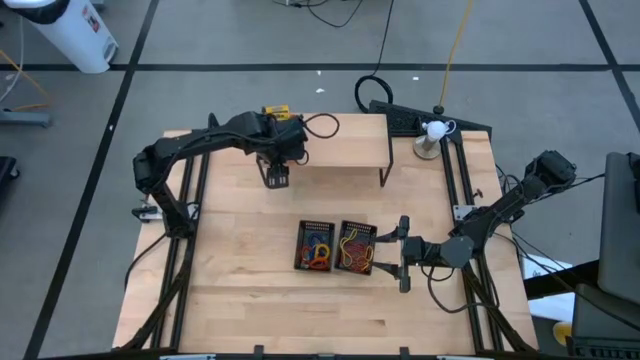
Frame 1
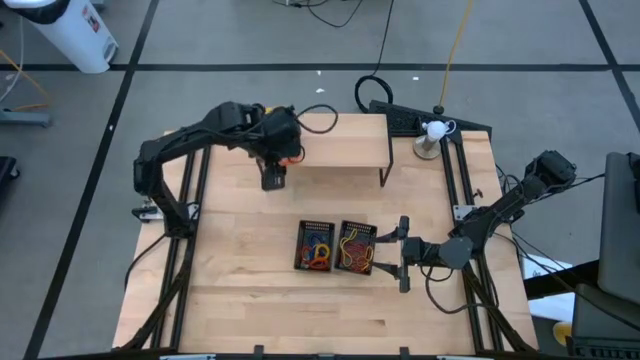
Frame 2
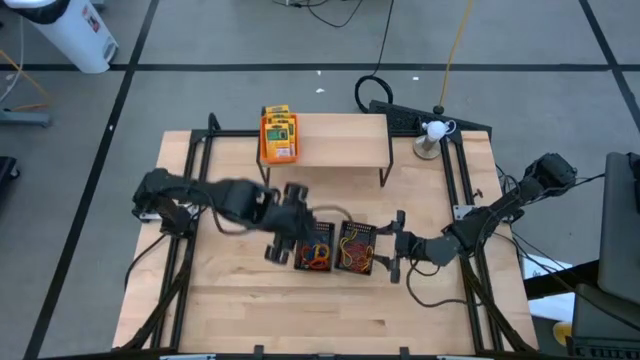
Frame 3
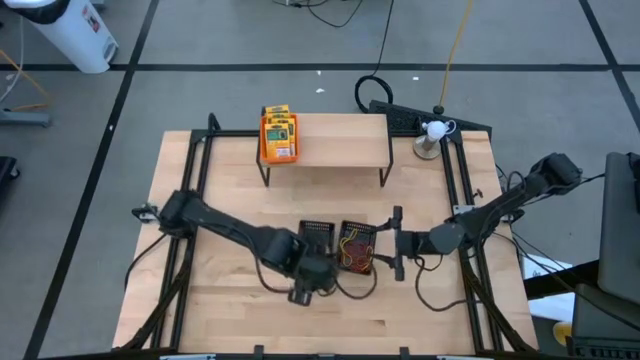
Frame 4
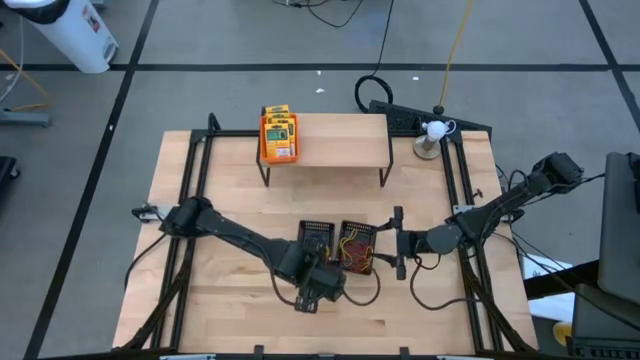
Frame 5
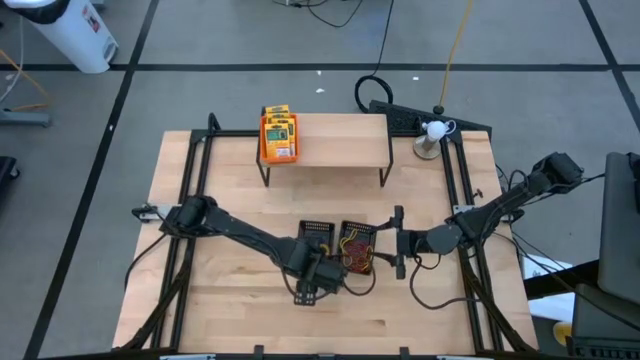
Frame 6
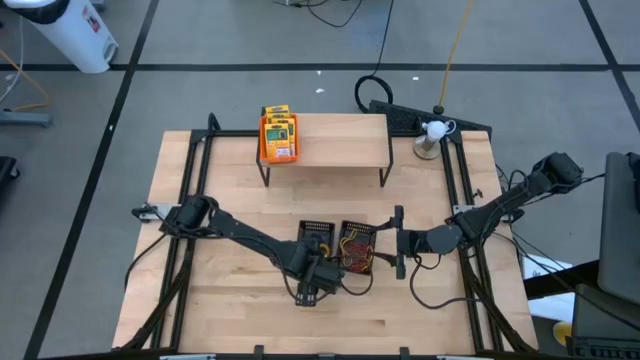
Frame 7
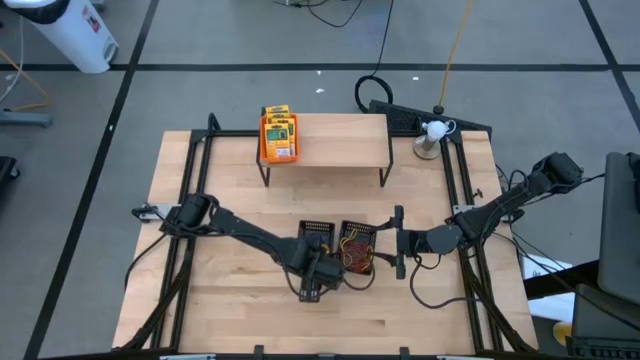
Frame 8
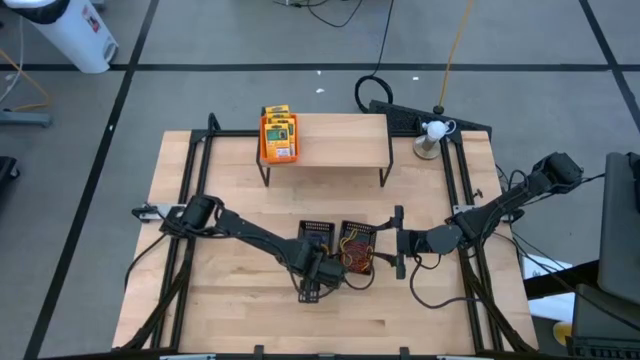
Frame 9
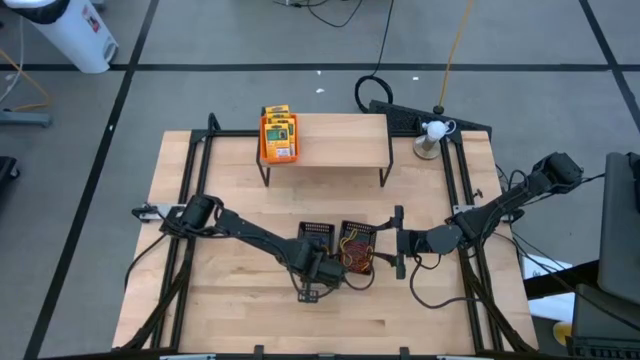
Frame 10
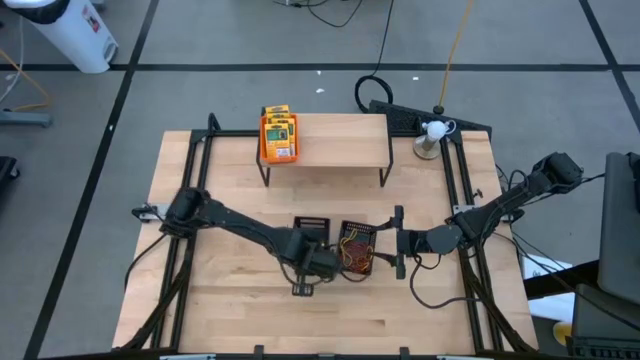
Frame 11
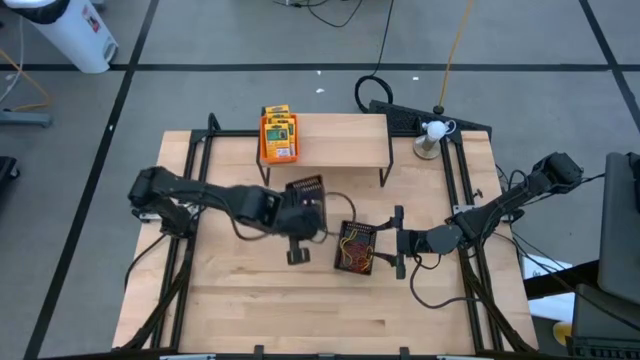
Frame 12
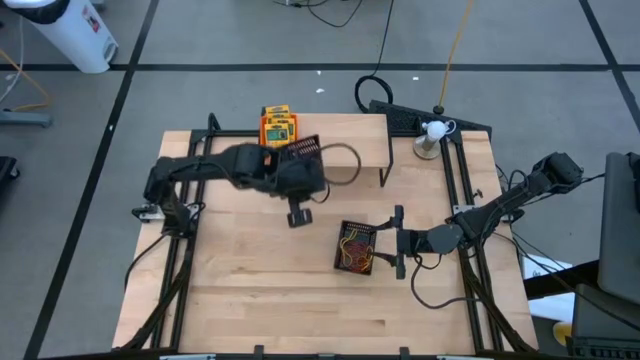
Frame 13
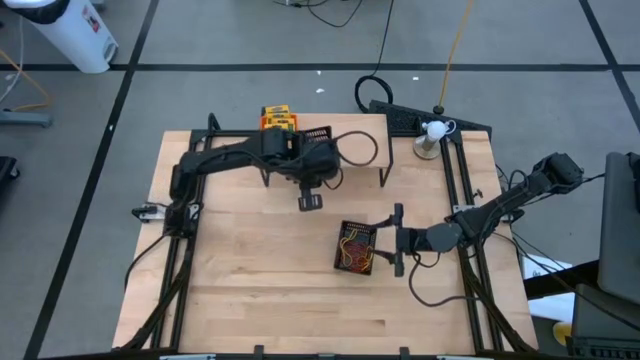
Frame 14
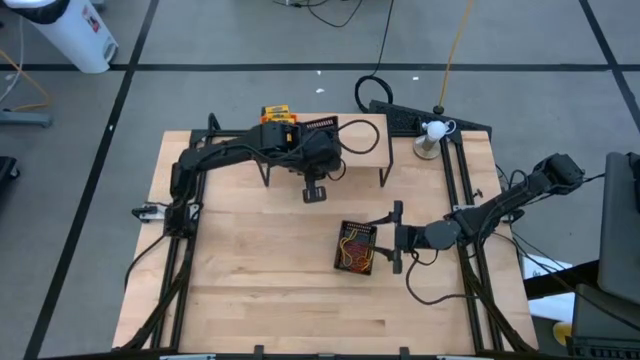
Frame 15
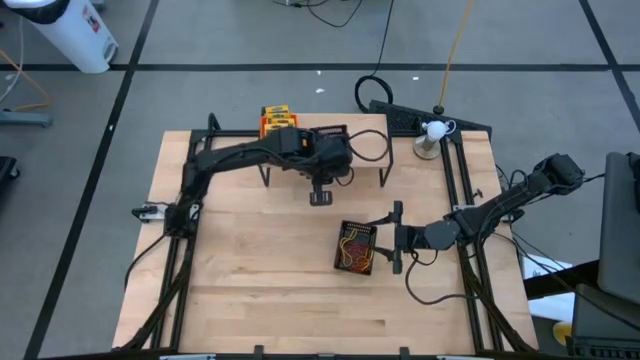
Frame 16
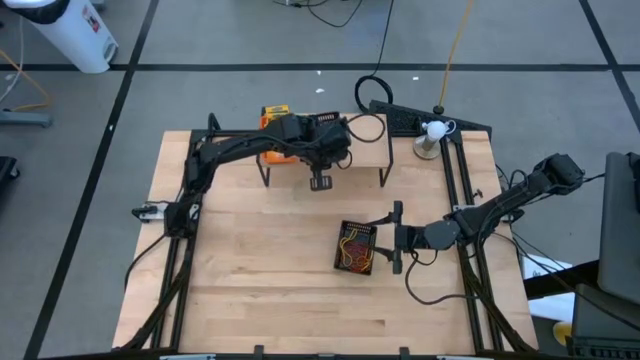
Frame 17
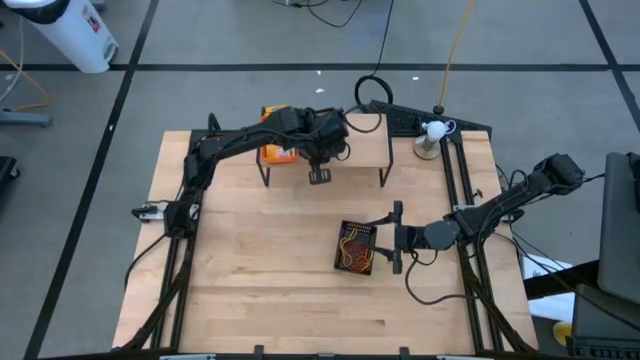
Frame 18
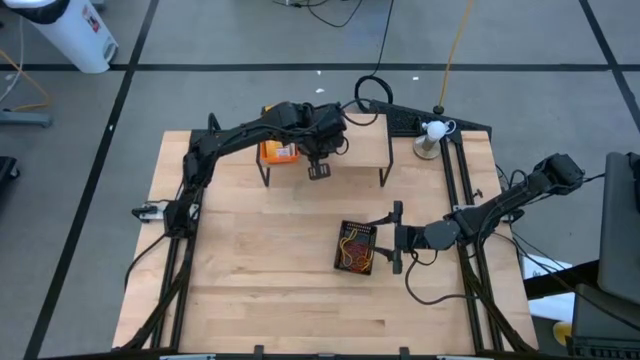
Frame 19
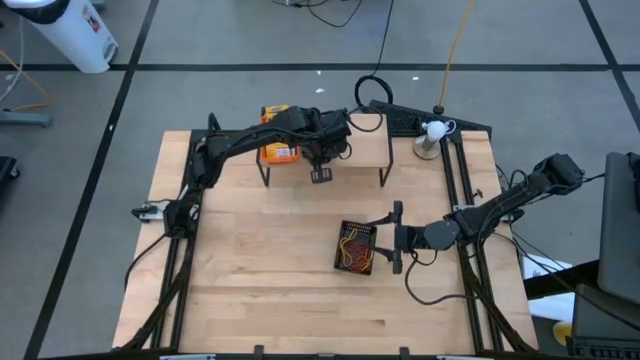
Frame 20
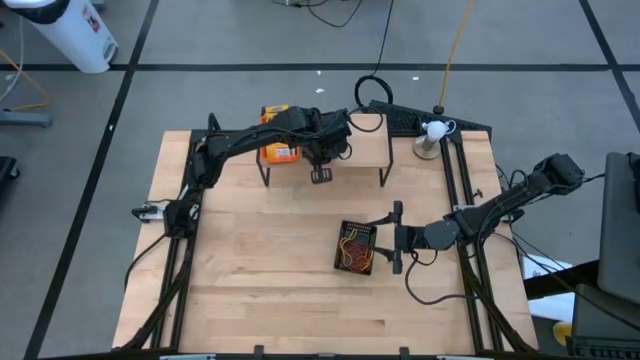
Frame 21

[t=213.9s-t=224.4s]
Task: Pick & Place Office Desk Supplies
Put the left black bin on the shelf

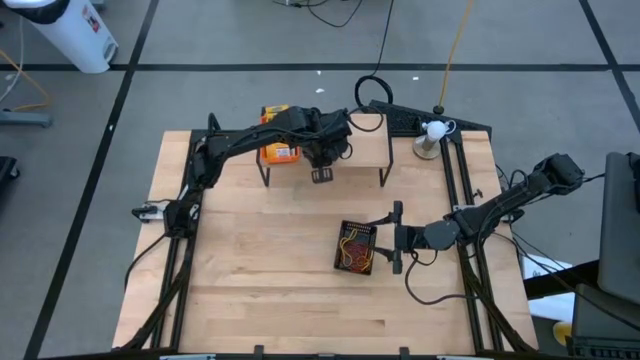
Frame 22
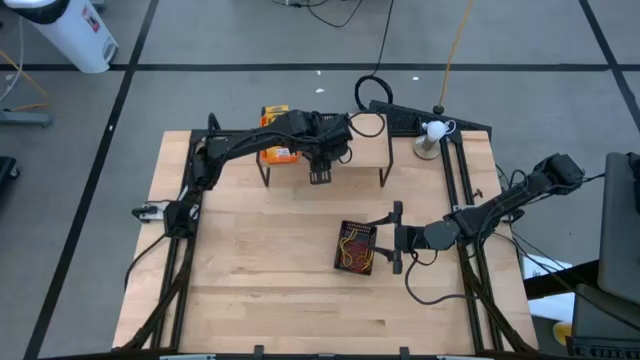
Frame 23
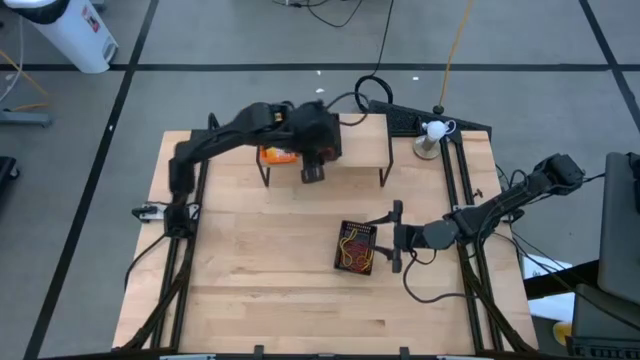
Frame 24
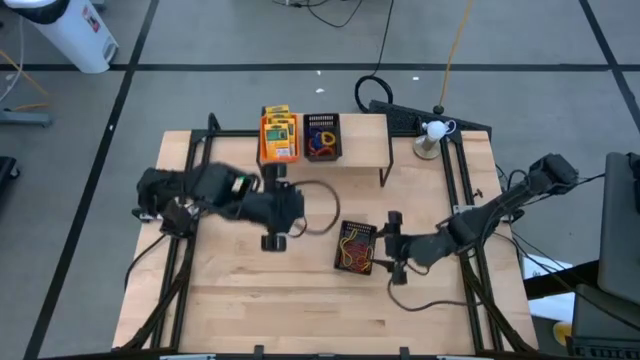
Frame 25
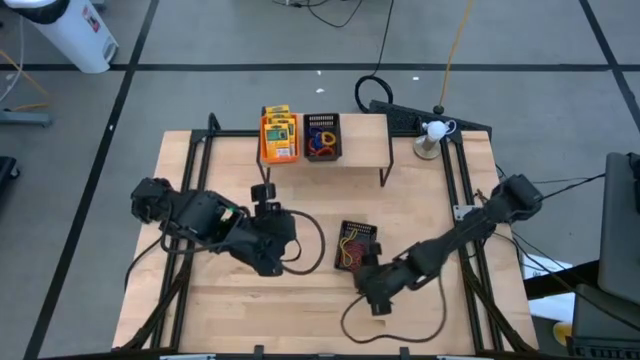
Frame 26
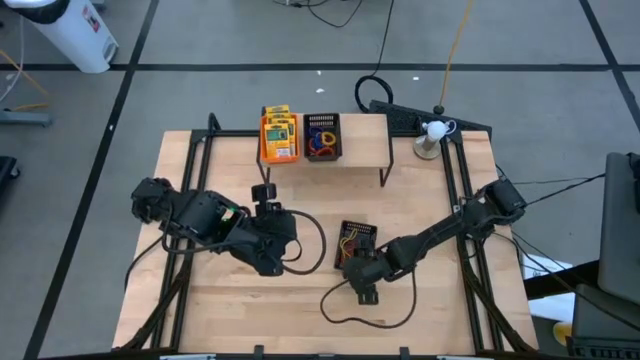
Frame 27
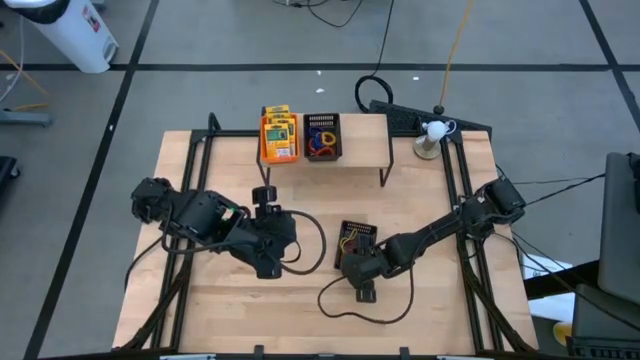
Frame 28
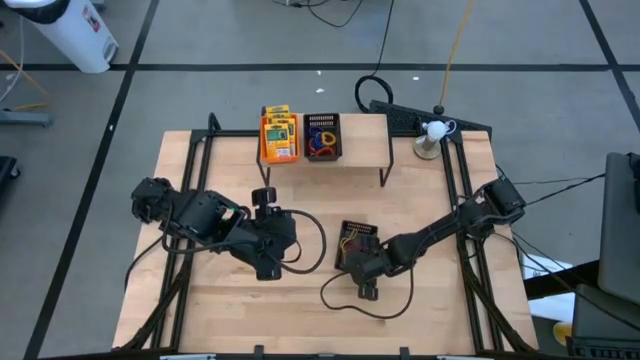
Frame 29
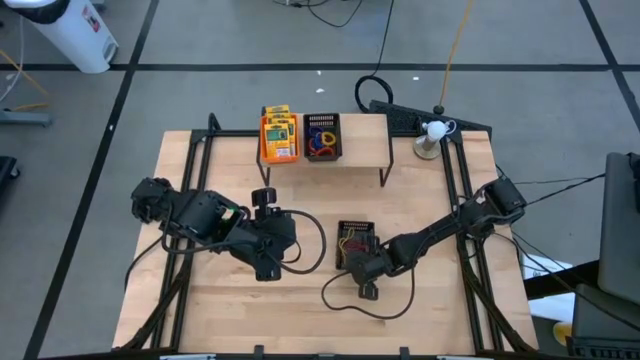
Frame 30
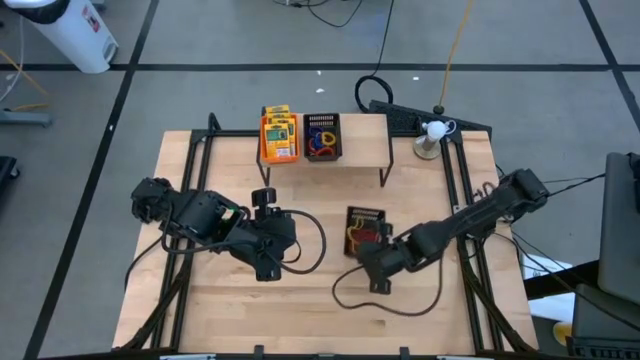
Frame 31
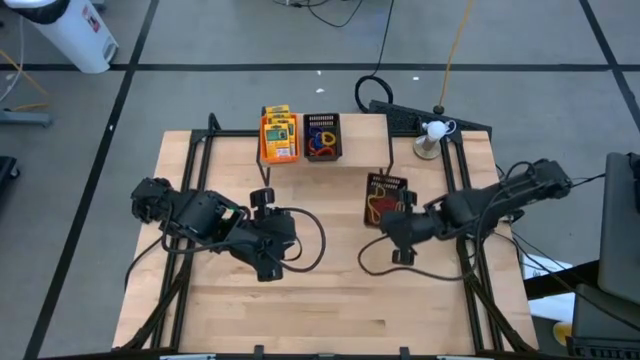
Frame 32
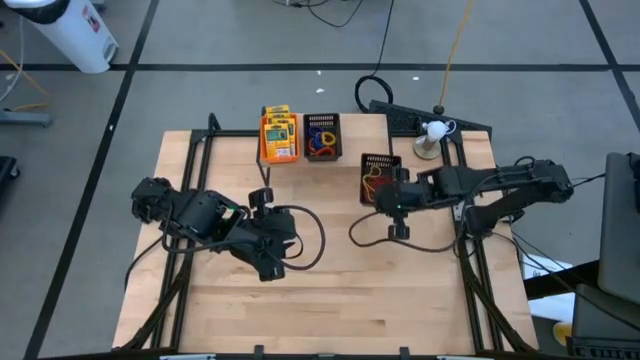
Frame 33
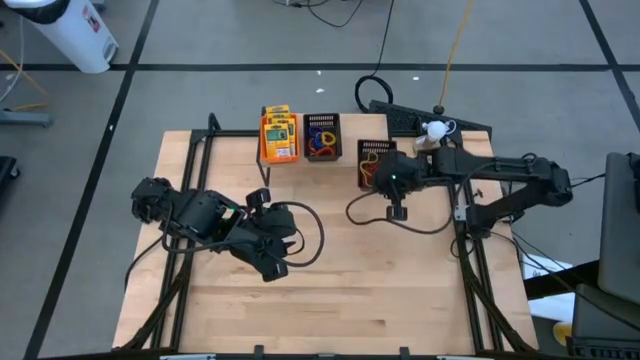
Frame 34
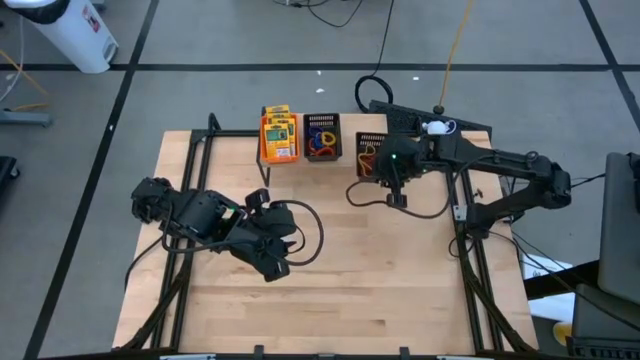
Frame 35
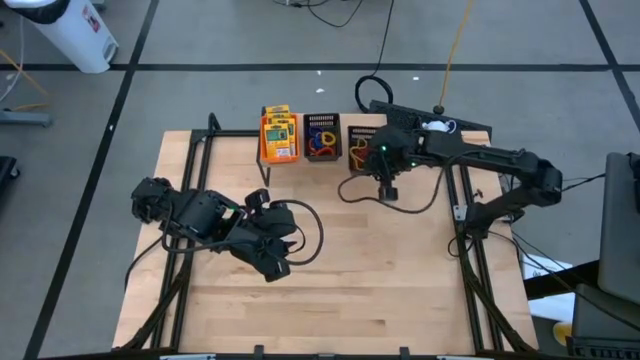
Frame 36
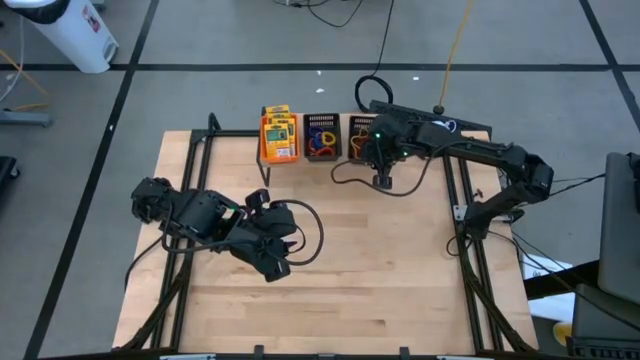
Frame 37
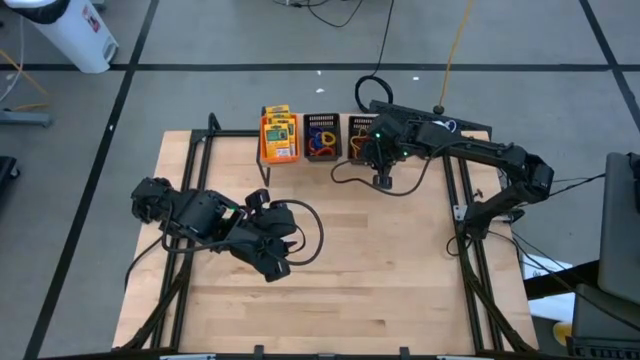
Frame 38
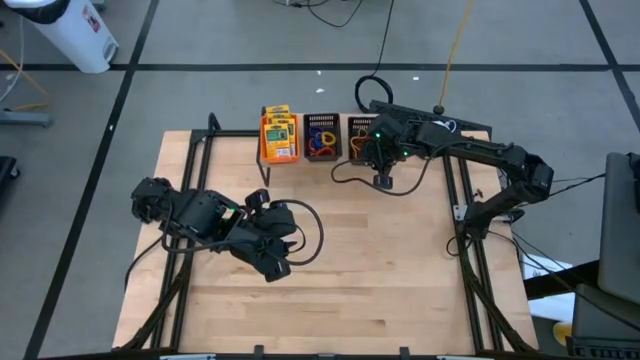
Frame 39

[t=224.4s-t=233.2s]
Put the black bin on the shelf

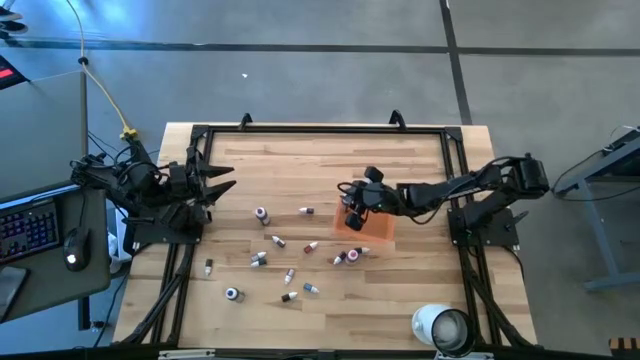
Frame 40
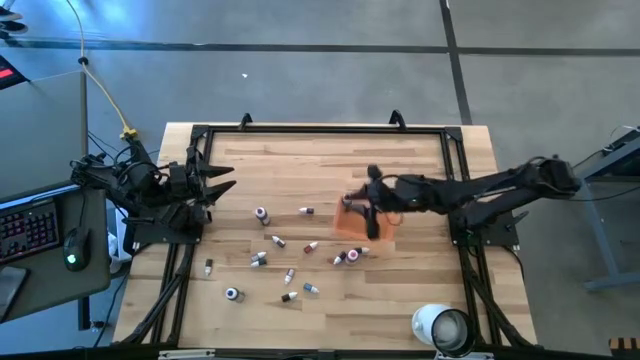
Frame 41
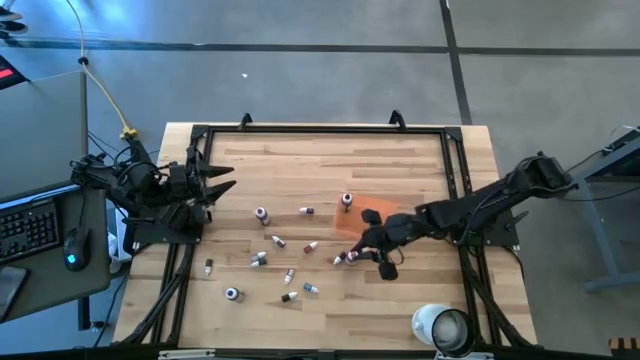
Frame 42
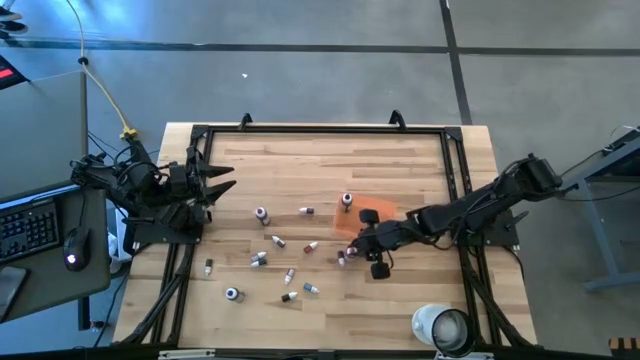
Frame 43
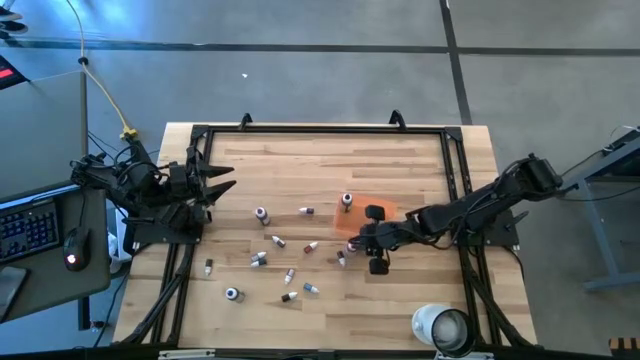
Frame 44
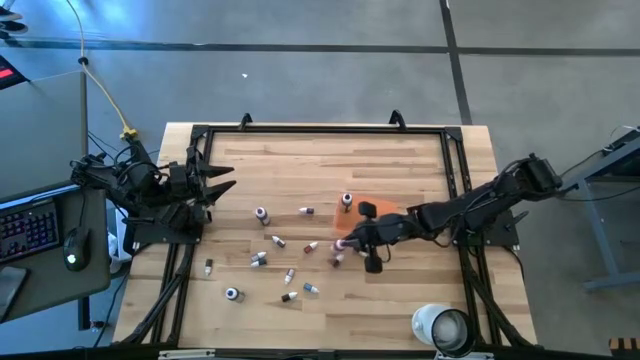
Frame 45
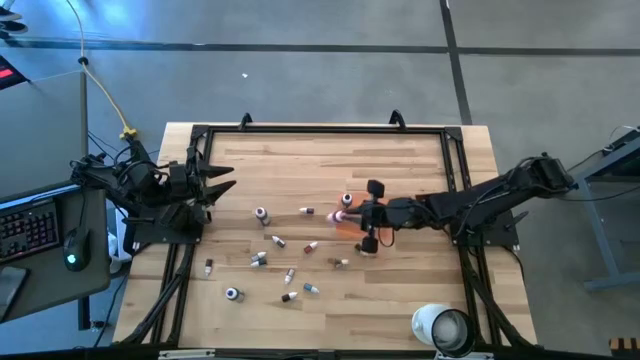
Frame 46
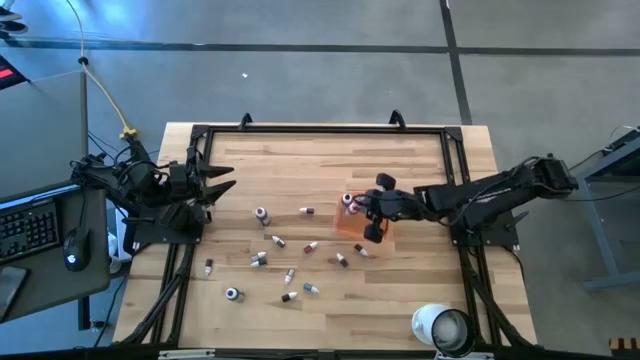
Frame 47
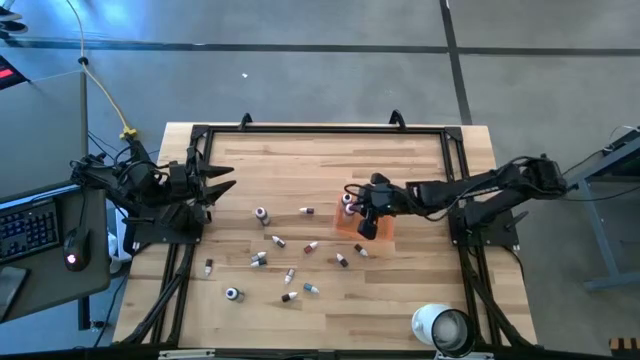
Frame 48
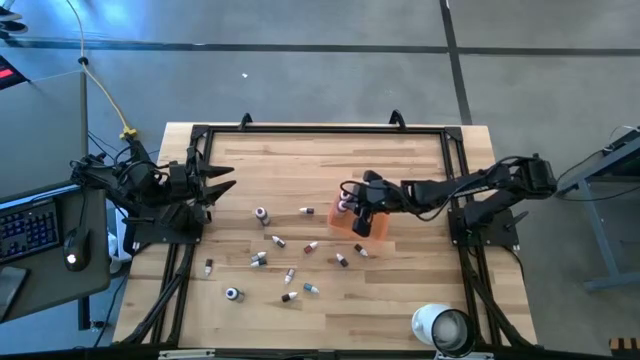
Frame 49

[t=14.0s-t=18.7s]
Task: Pick & Place food coloring
Put the big pink food coloring bottle into the orange bin
